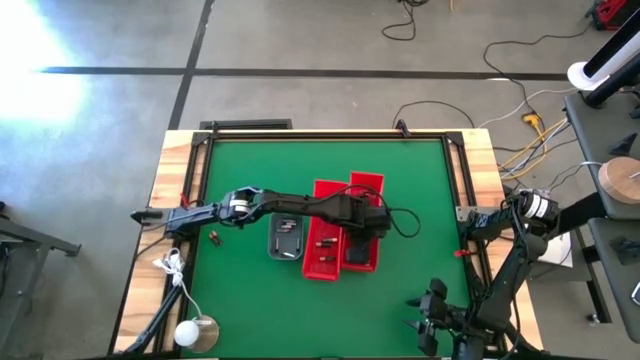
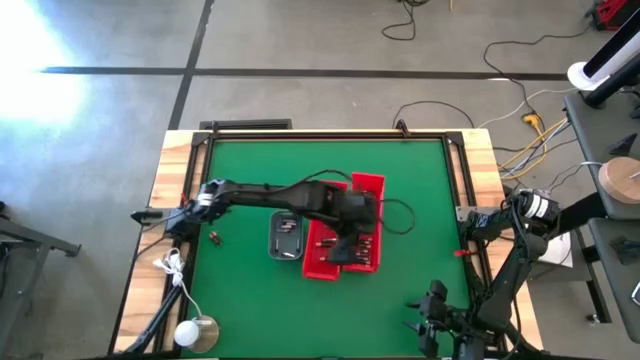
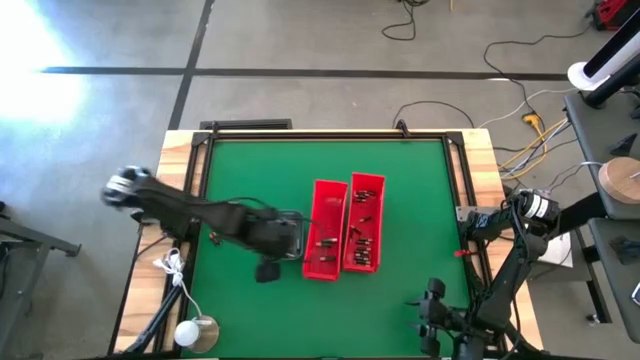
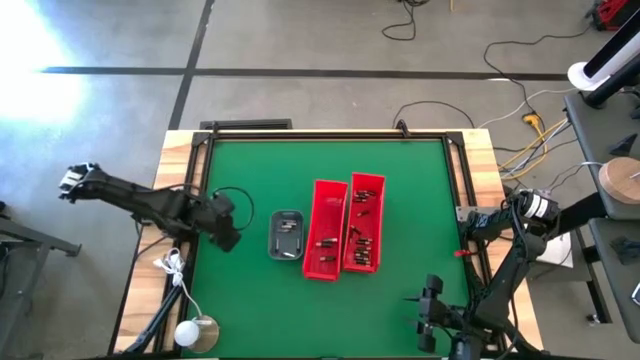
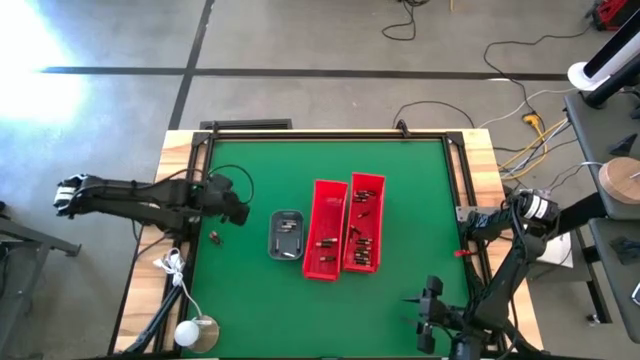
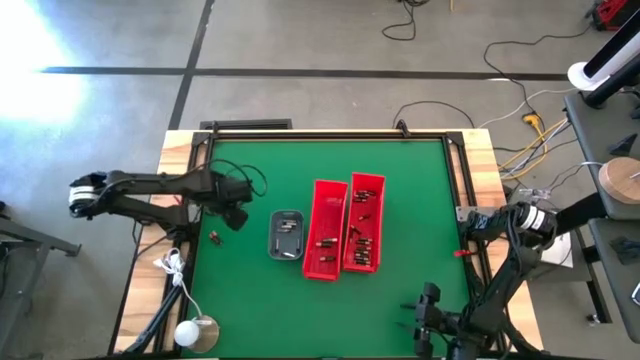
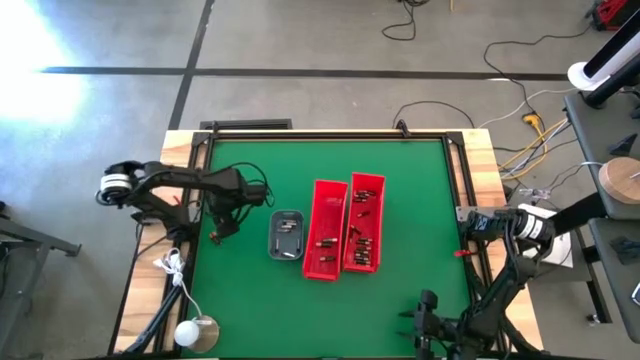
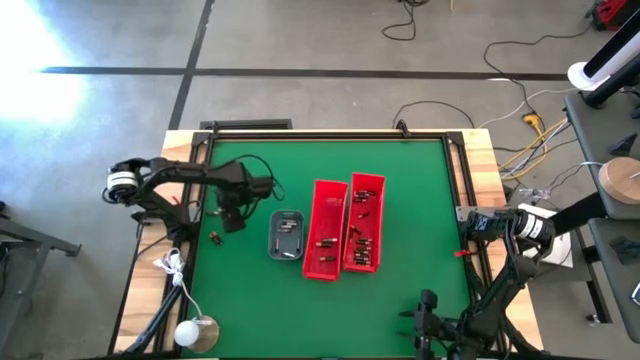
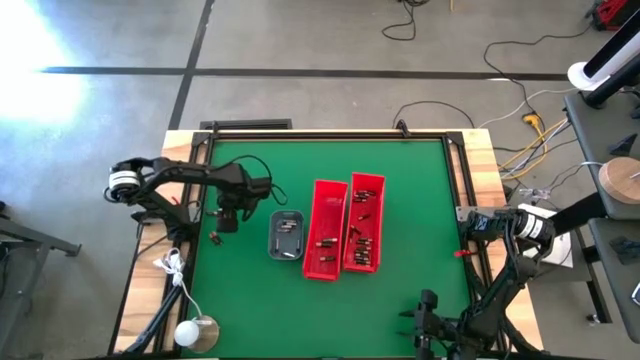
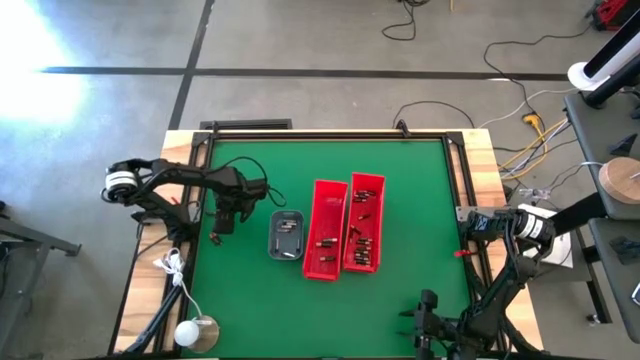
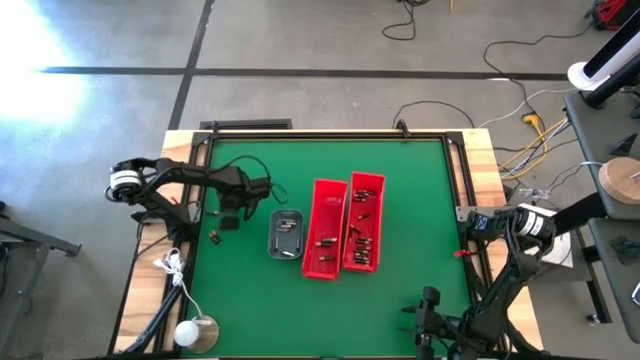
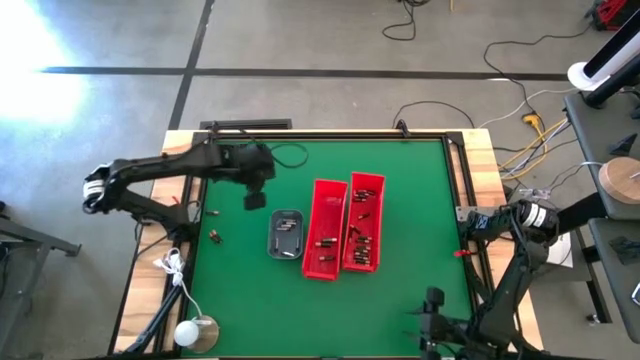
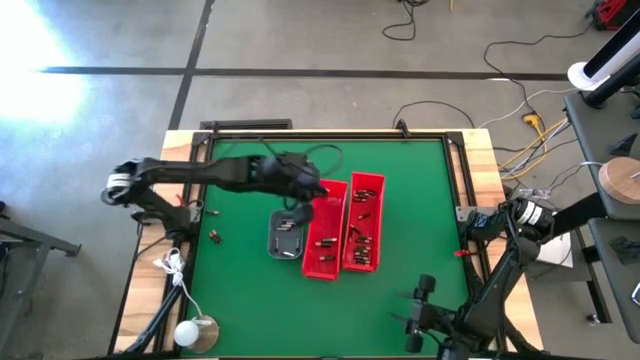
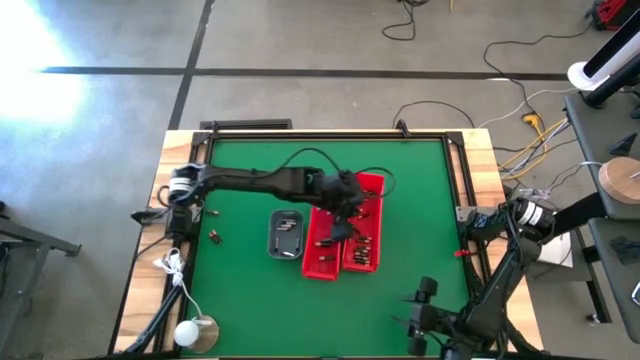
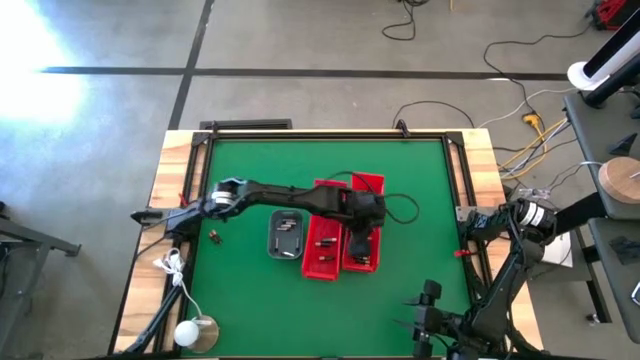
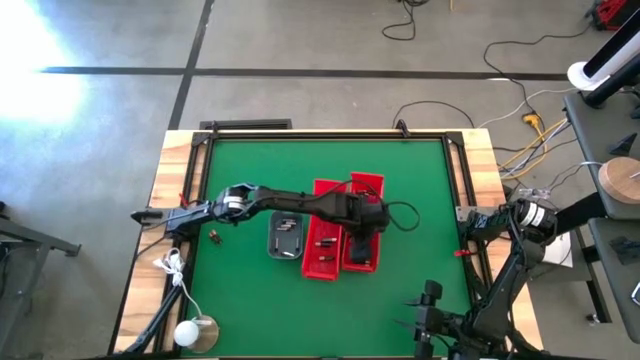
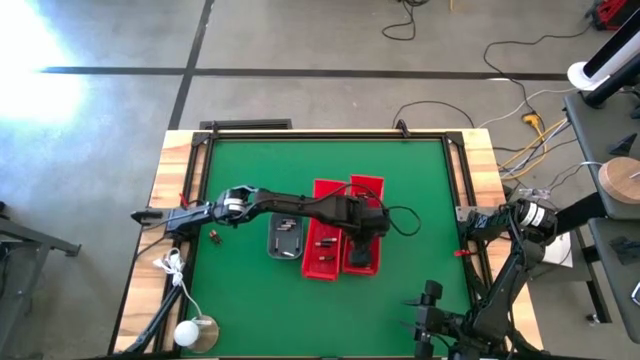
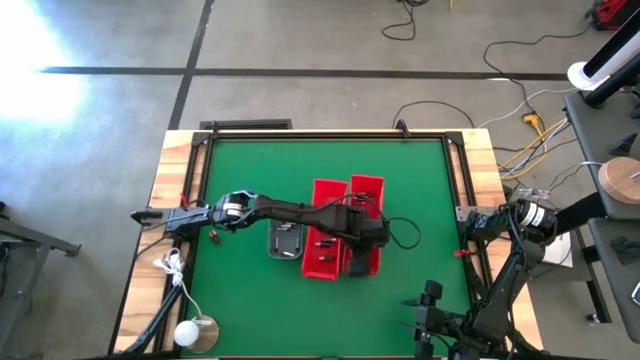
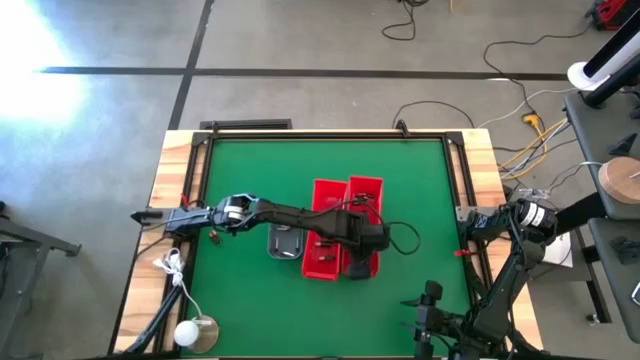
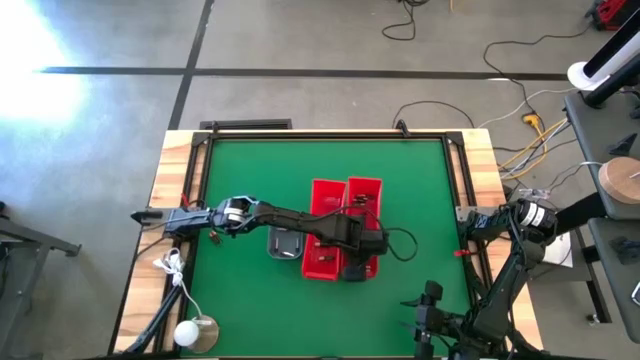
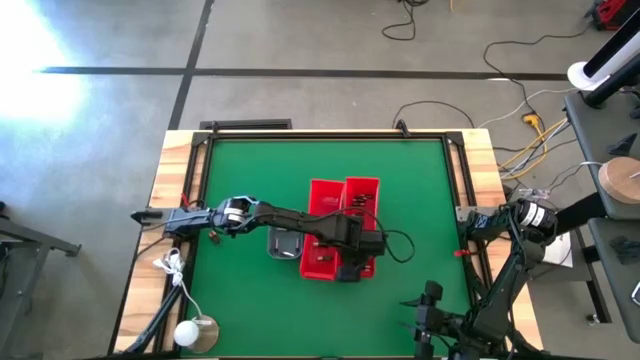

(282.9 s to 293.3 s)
Task: Sort batteries
Put the small black battery into the right red bin

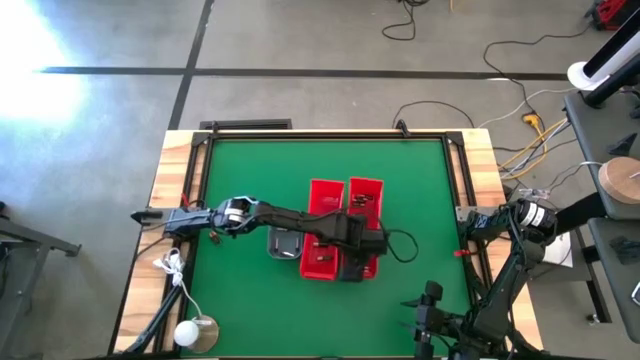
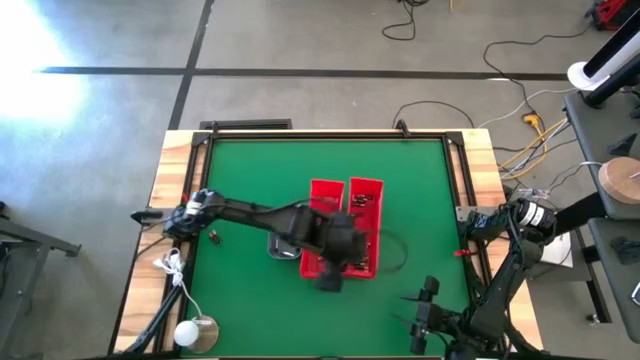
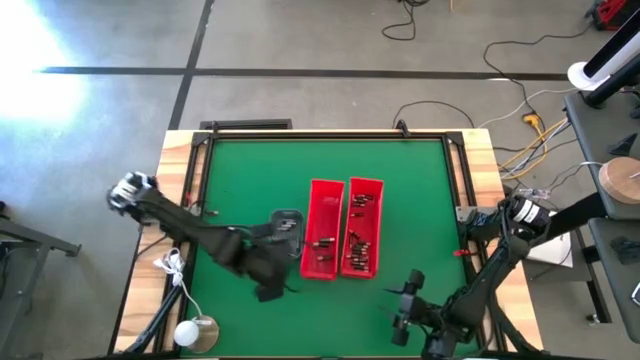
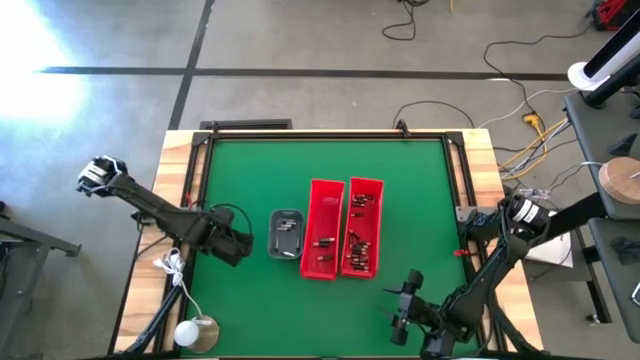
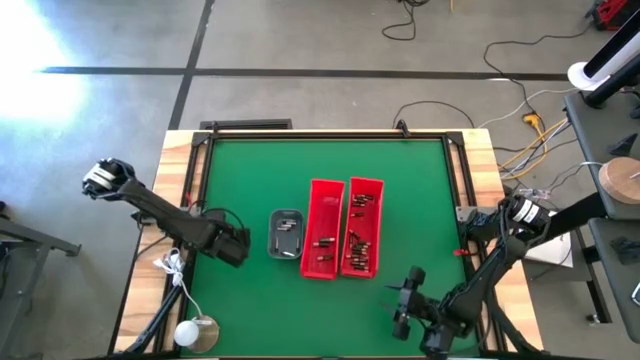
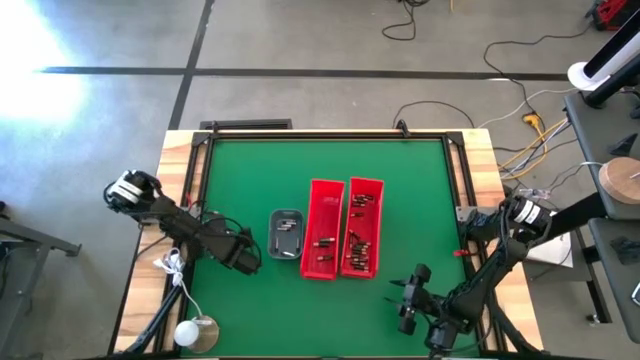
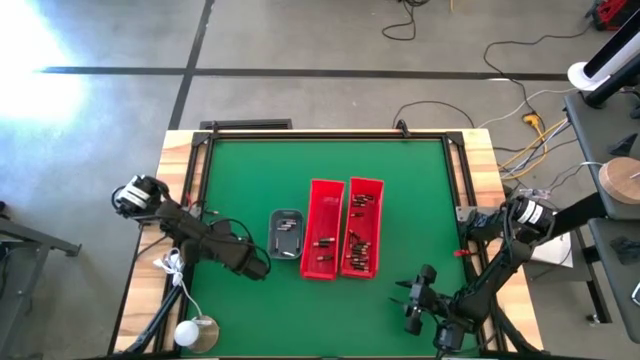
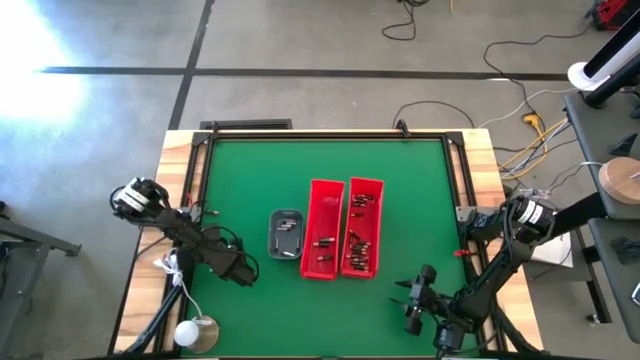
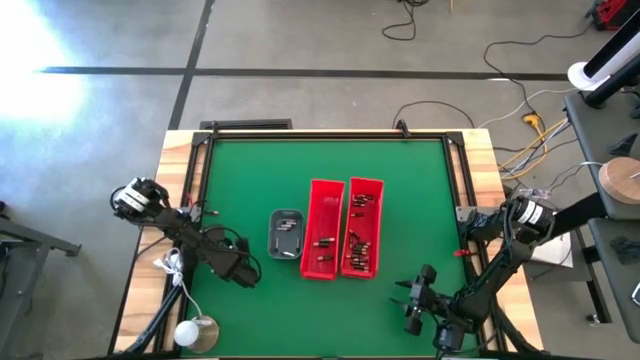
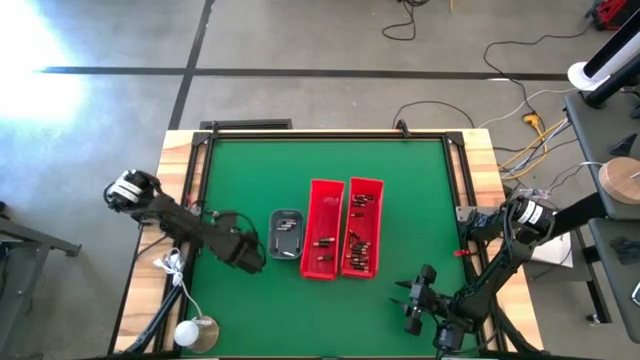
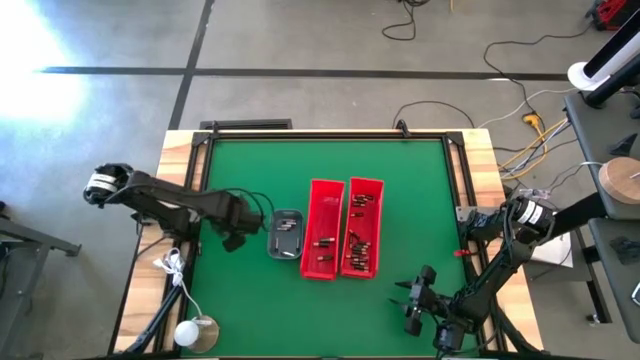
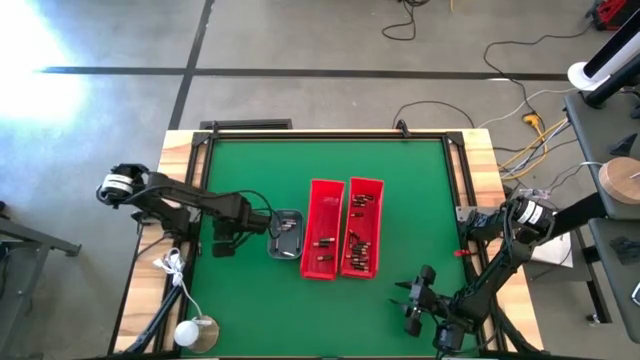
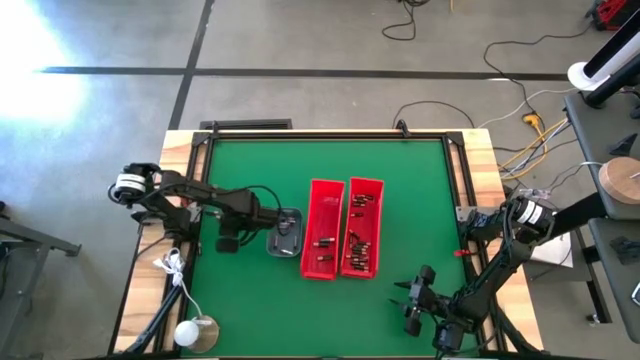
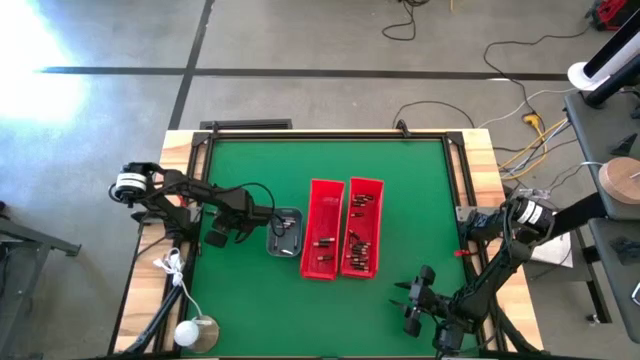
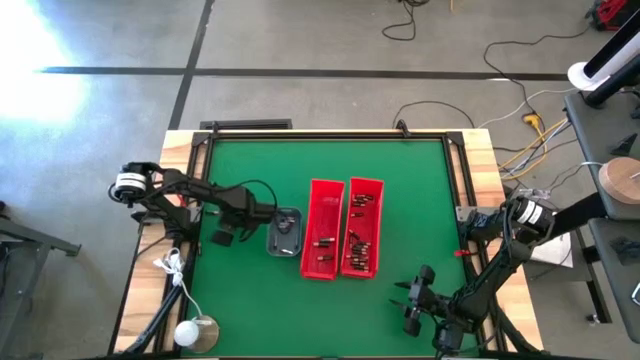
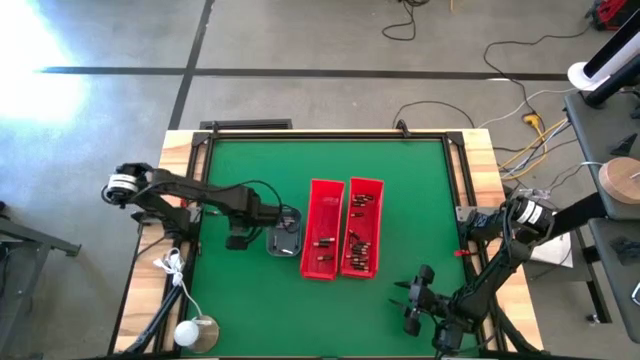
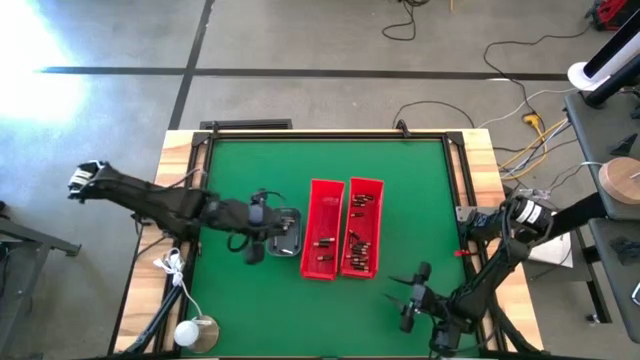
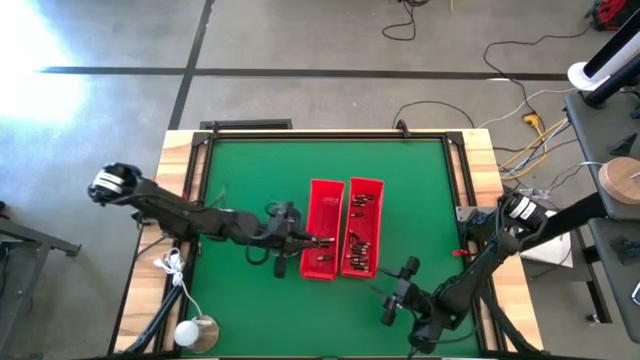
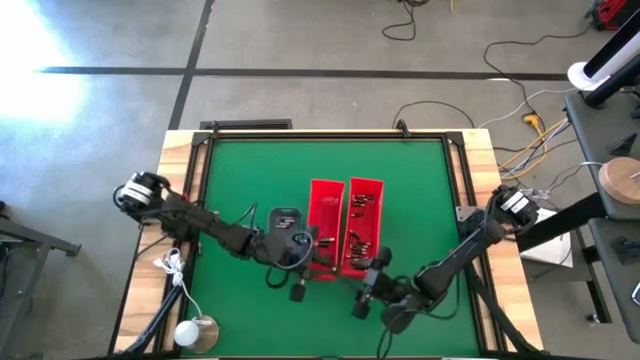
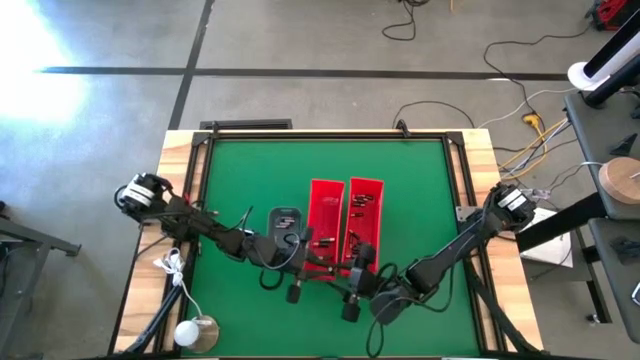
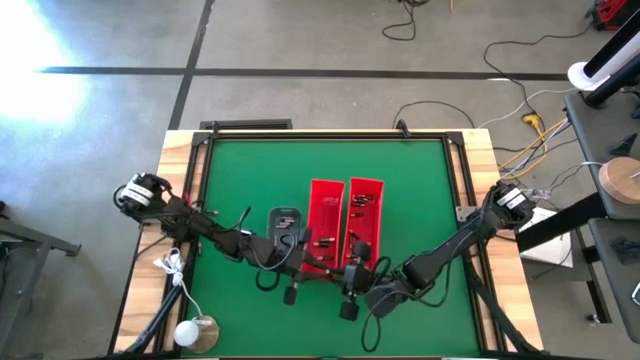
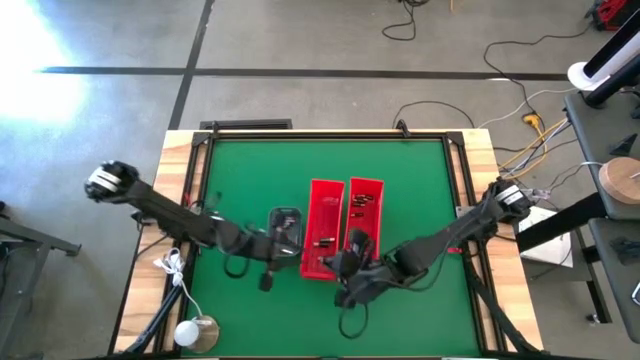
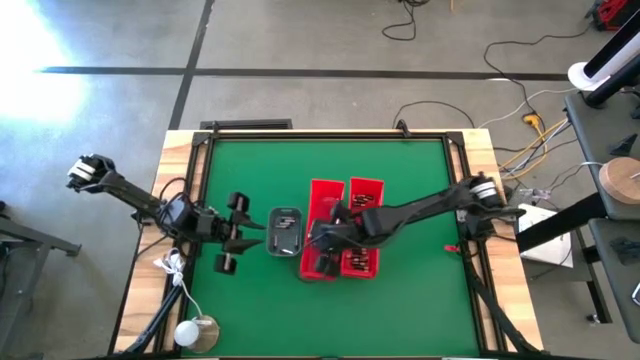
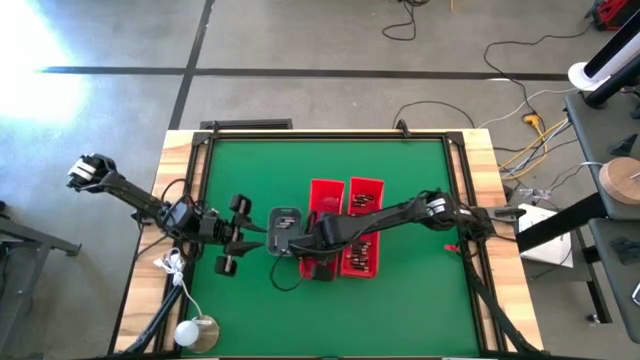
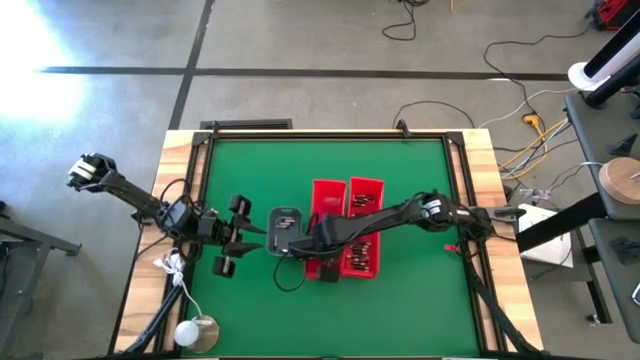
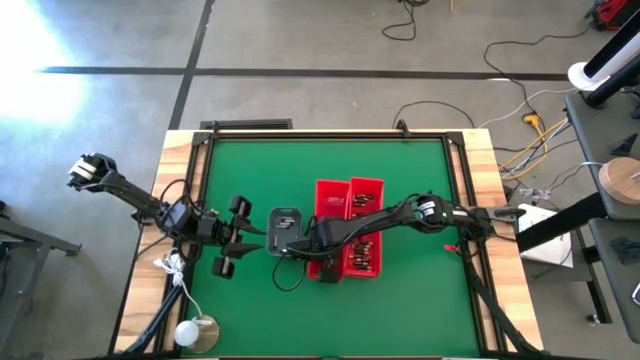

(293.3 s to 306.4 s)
Put the big black battery into the left red bin
